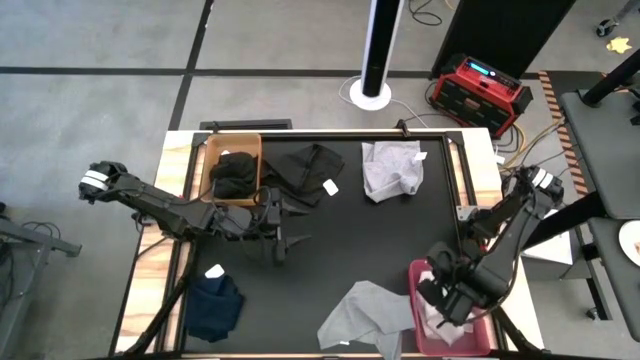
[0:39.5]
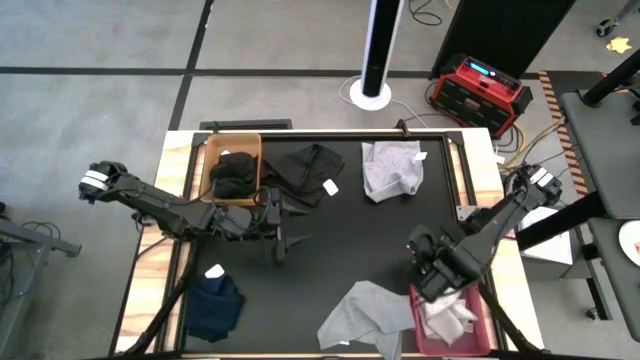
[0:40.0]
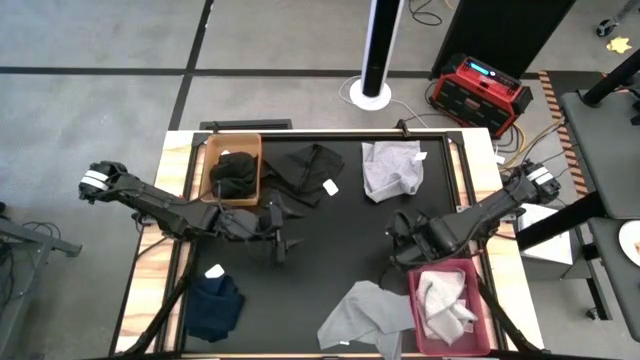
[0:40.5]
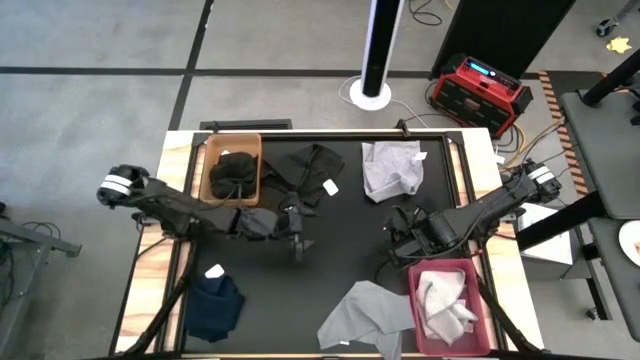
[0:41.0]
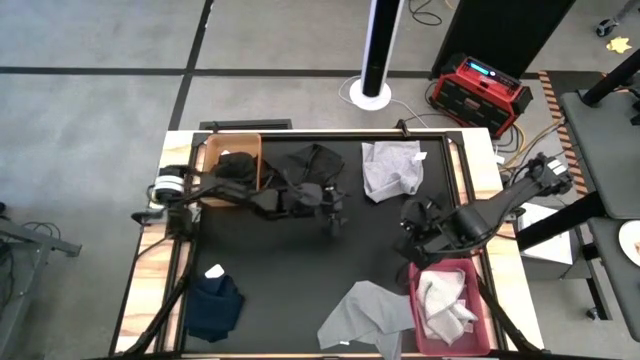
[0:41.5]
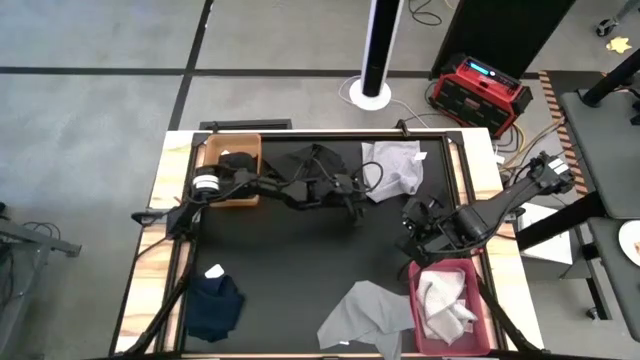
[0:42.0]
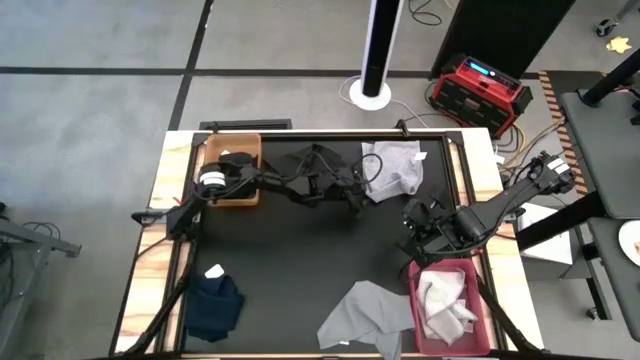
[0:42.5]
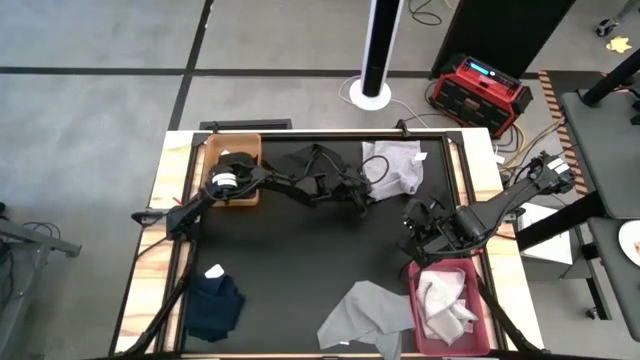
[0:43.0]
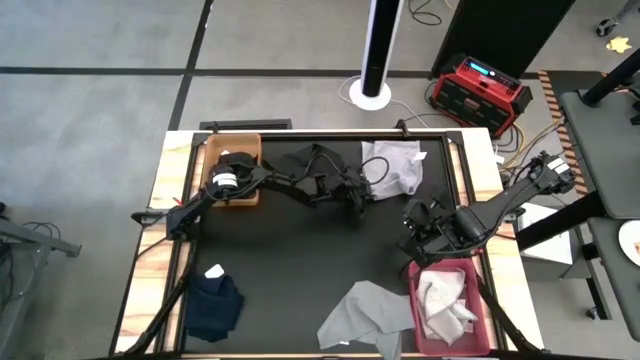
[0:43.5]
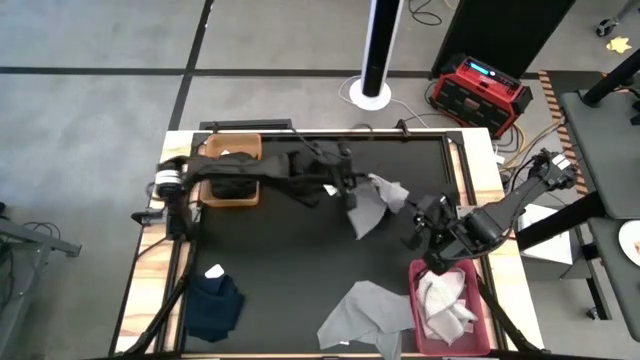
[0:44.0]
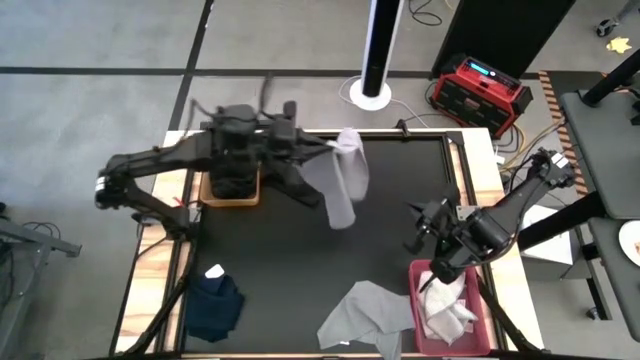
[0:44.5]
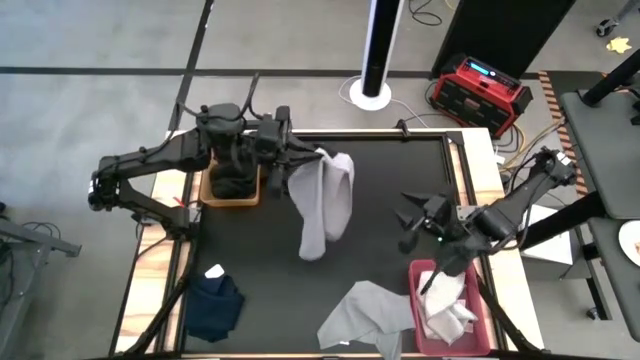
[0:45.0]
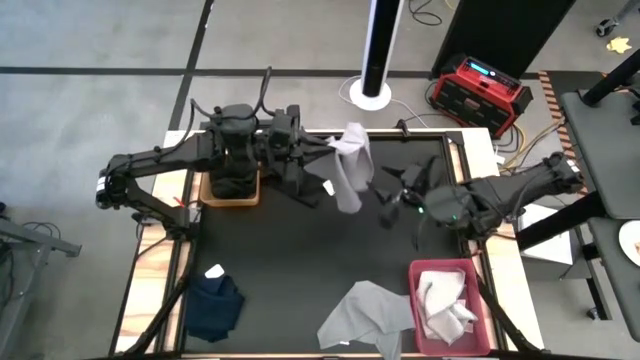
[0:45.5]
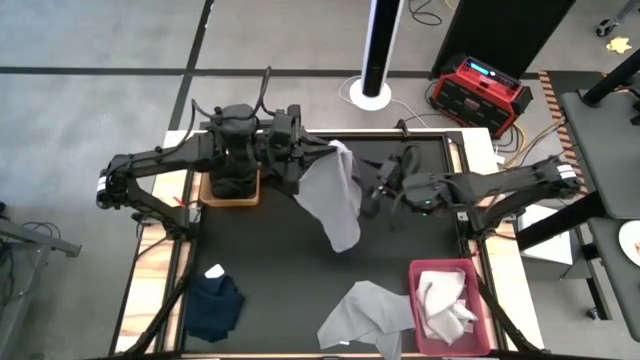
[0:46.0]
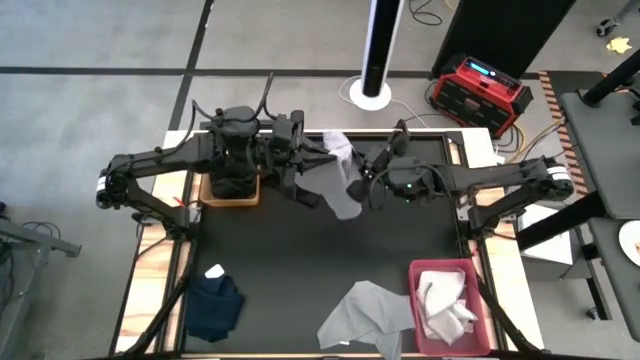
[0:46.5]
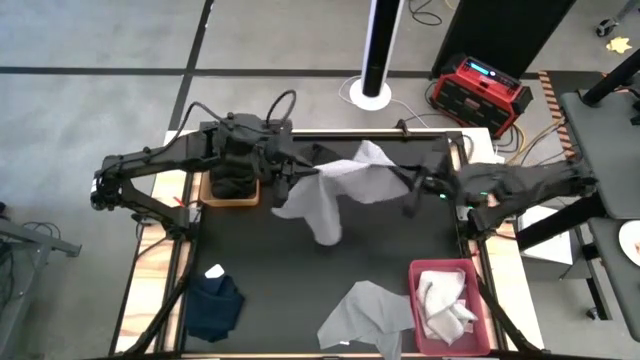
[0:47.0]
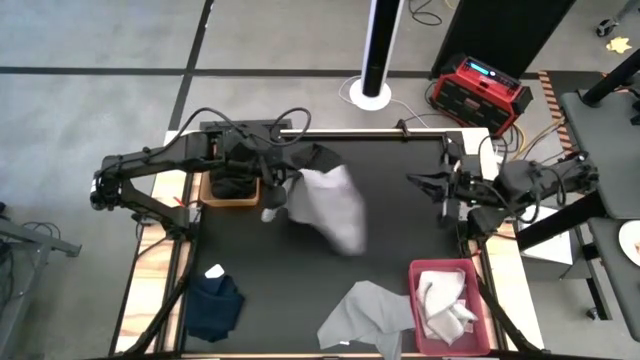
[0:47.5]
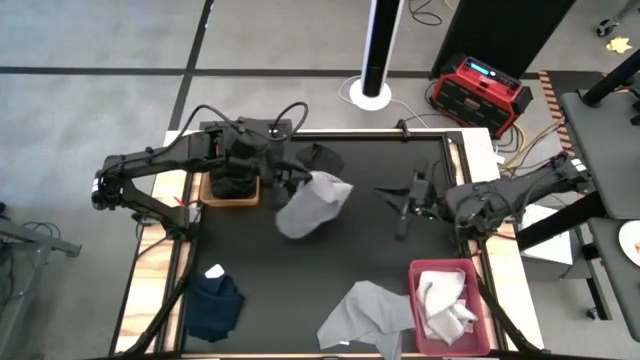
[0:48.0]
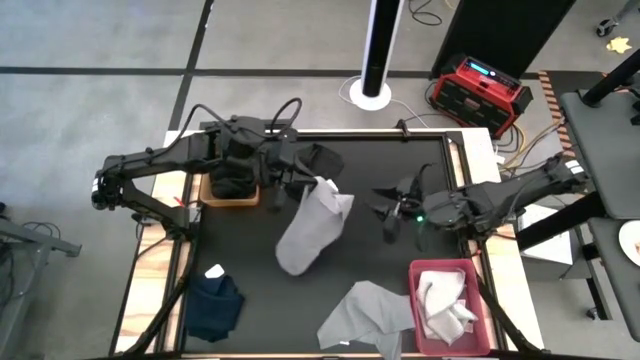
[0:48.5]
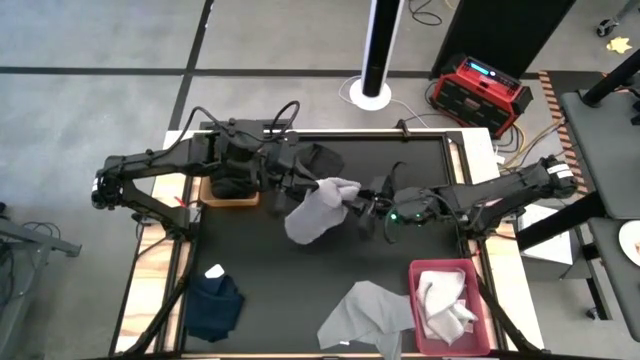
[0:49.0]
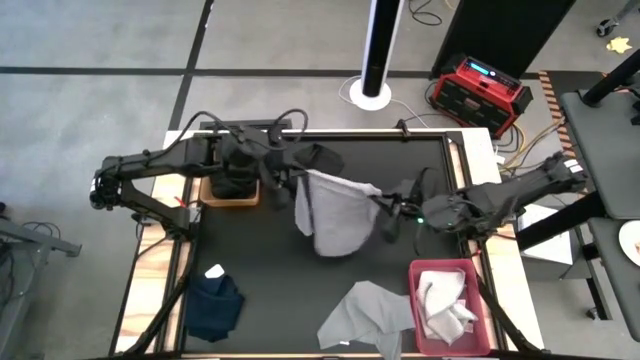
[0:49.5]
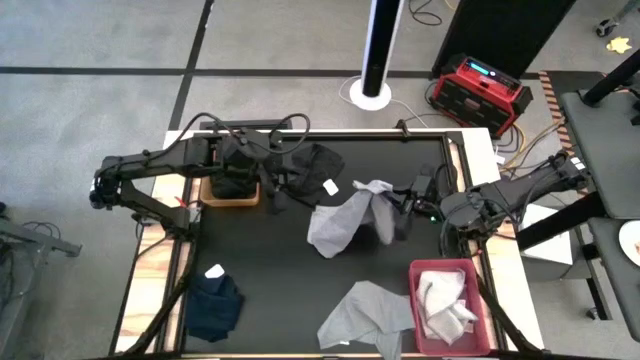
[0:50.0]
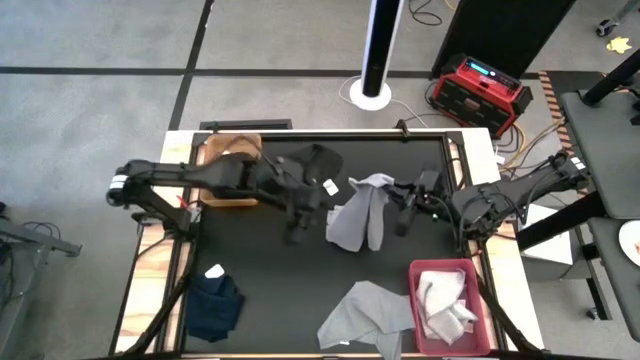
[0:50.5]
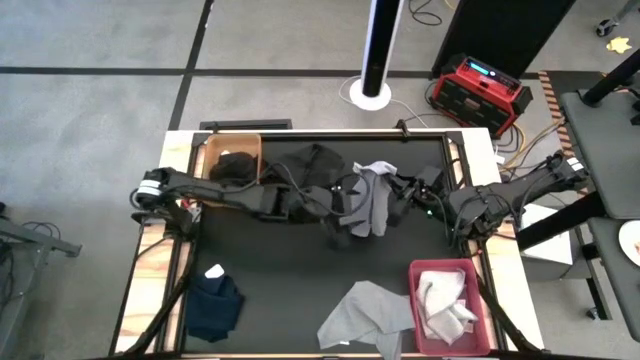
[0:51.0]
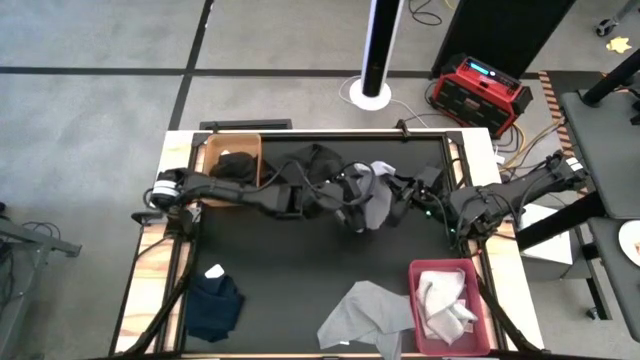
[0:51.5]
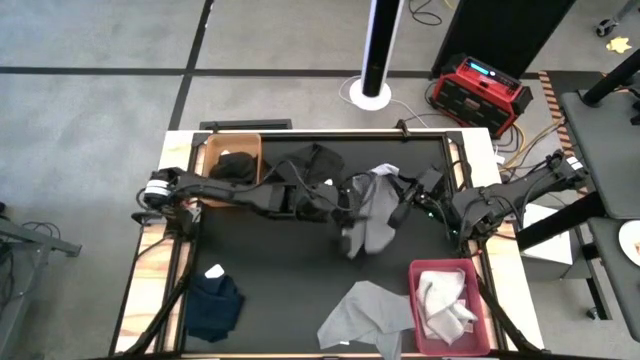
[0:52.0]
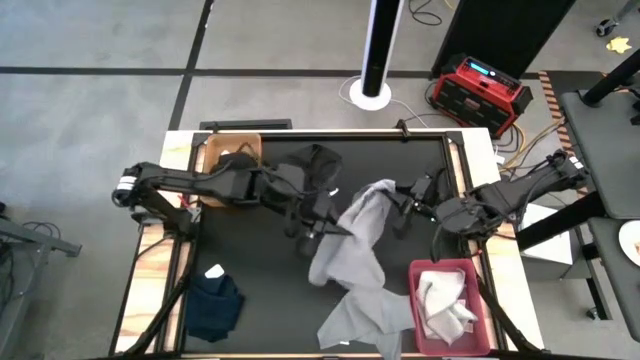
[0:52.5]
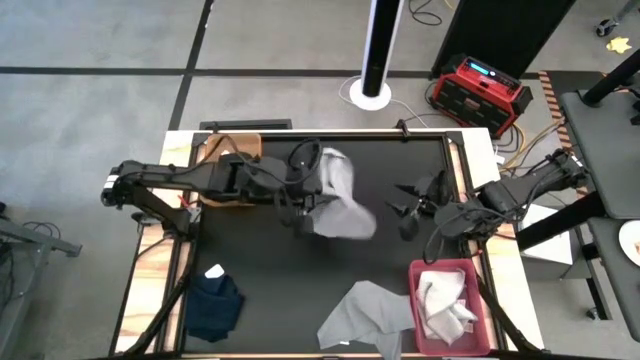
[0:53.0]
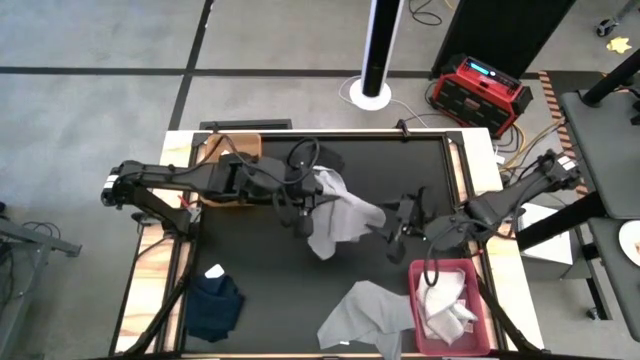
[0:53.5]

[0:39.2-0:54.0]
Task: Sort towels by color in basket
Put the top gray towel into the pink bin

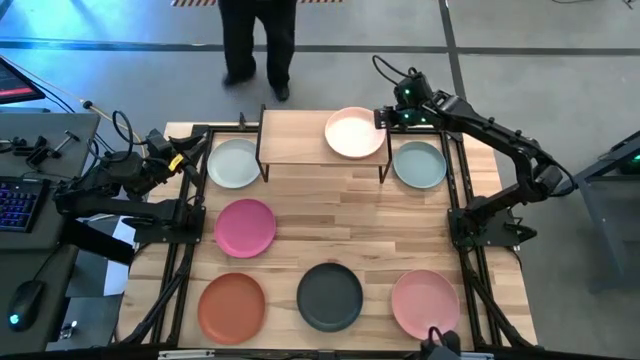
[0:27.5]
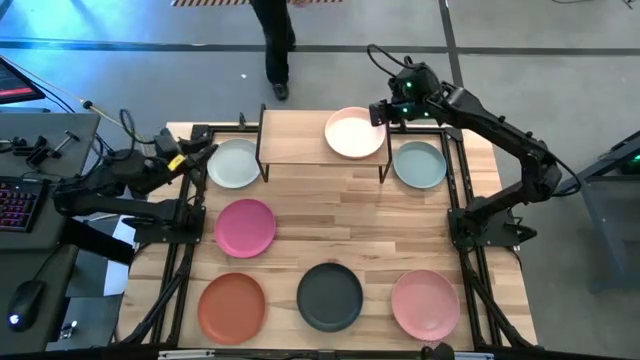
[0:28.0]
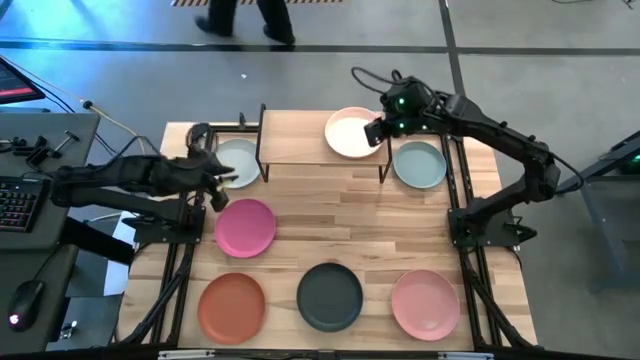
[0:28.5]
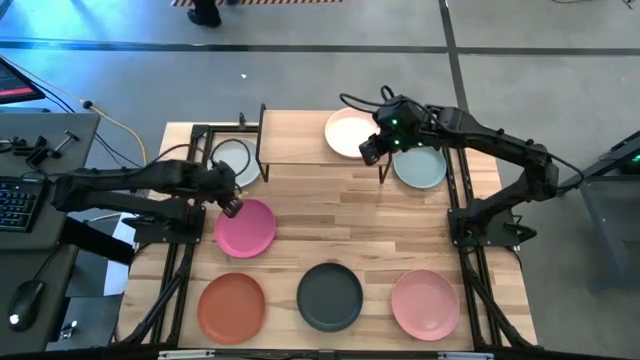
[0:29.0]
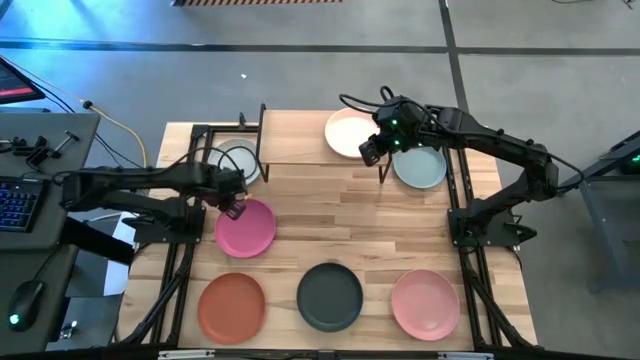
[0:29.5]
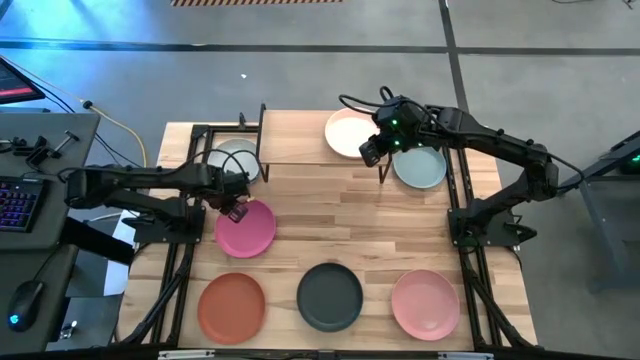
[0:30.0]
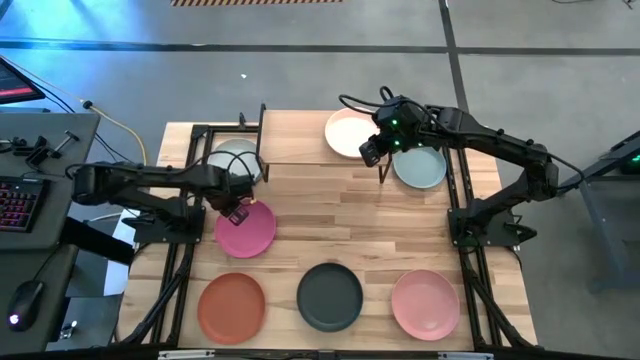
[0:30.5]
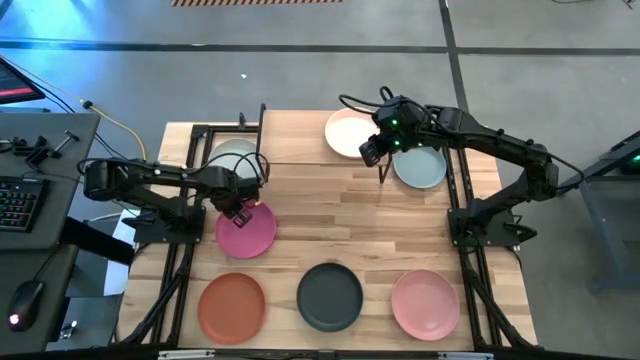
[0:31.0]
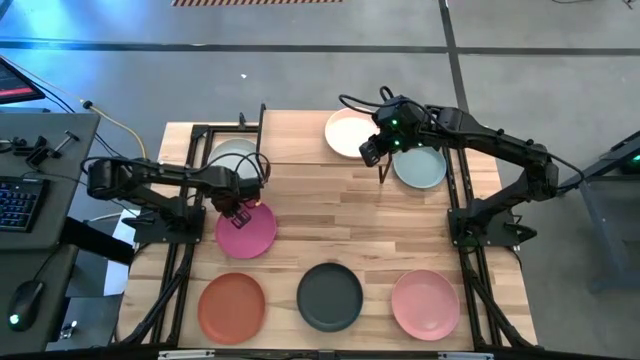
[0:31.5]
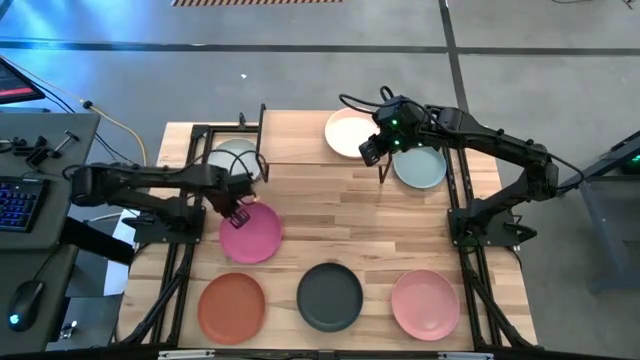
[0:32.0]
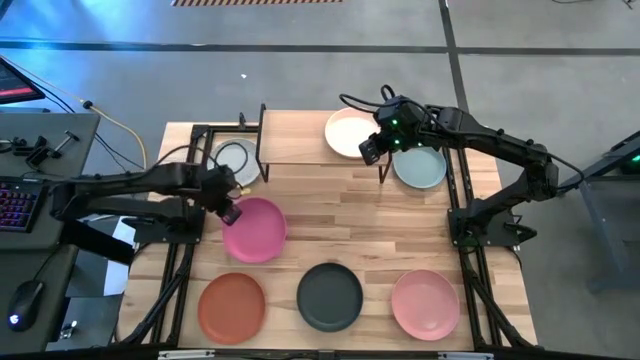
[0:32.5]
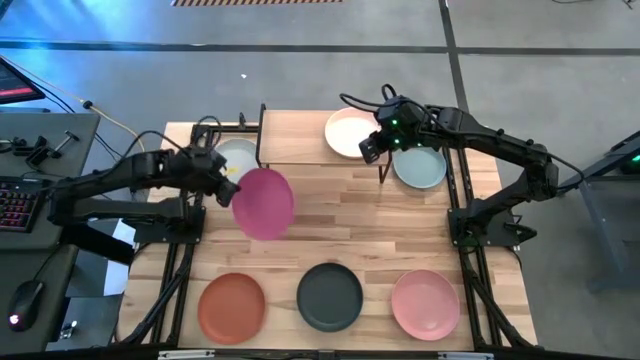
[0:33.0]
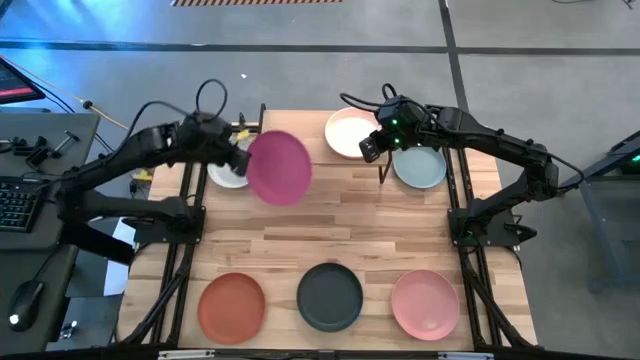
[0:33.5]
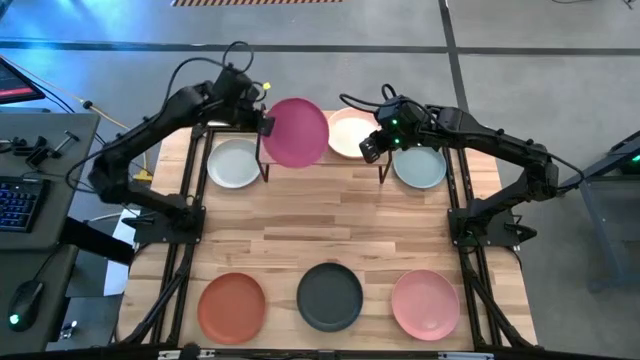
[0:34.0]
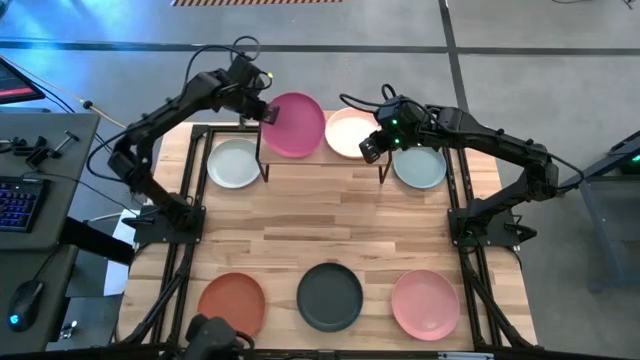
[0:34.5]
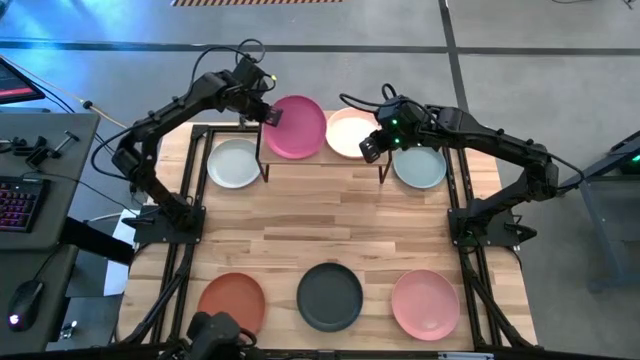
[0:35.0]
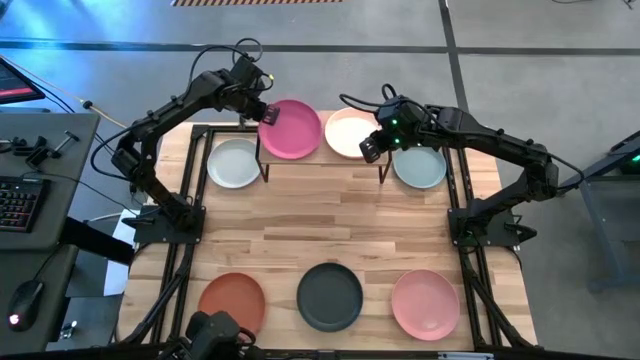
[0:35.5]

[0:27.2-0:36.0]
Task: Place and stack plates onto a shelf
Put the pink plate on the shelf
